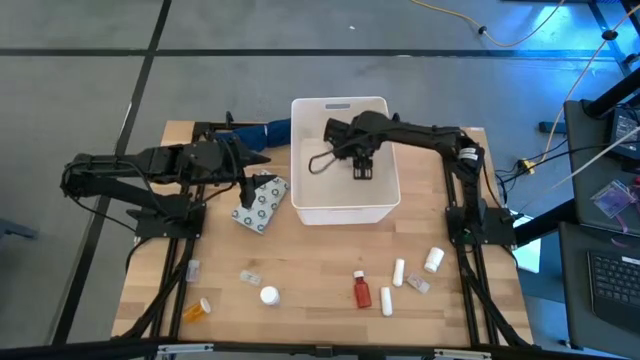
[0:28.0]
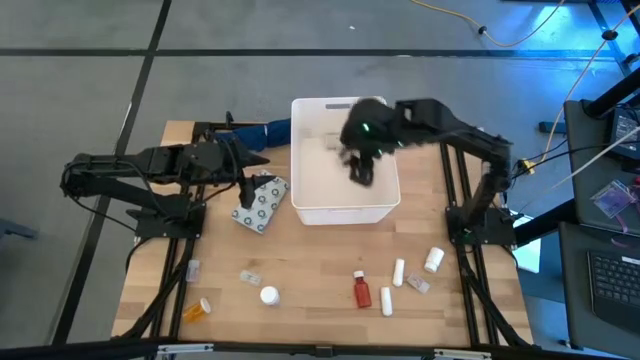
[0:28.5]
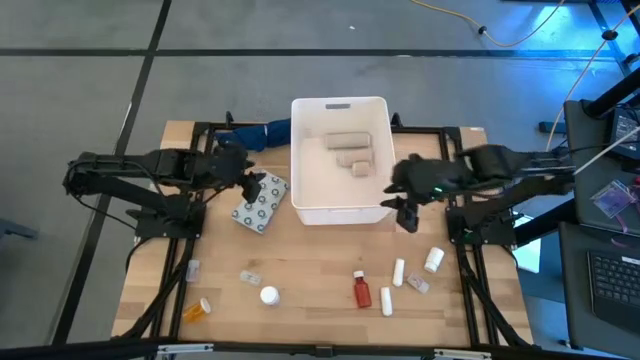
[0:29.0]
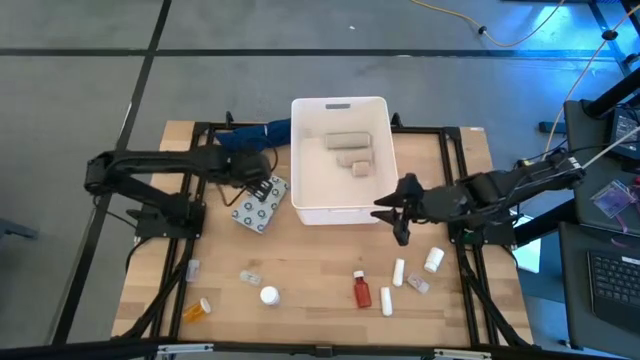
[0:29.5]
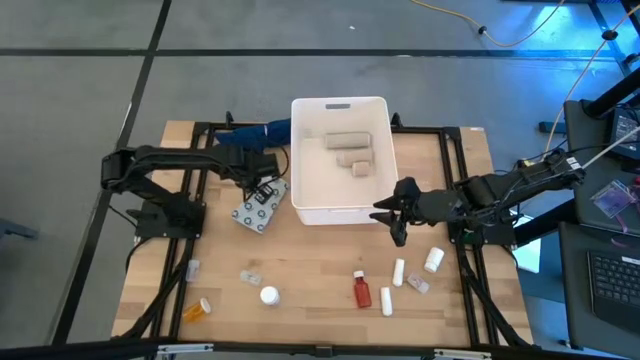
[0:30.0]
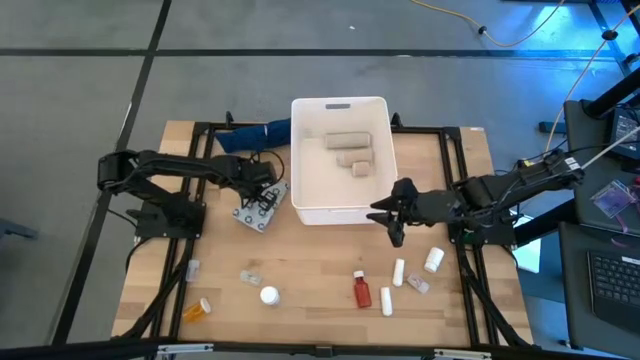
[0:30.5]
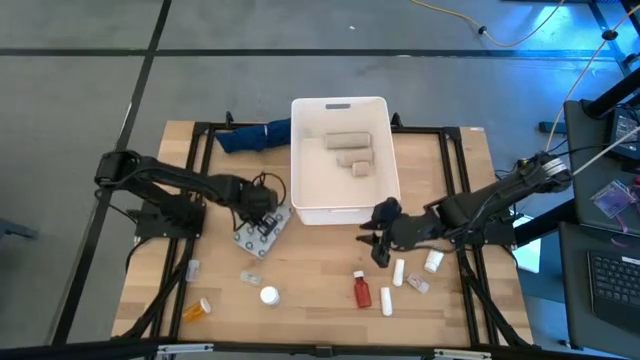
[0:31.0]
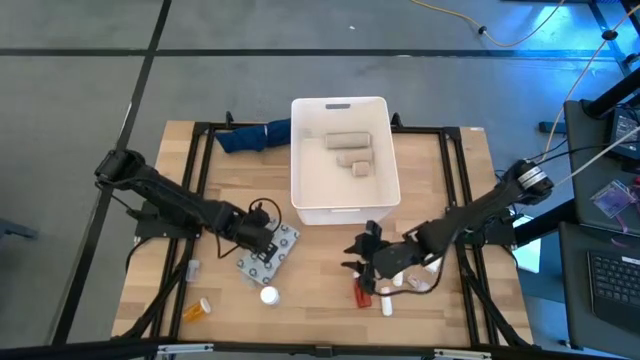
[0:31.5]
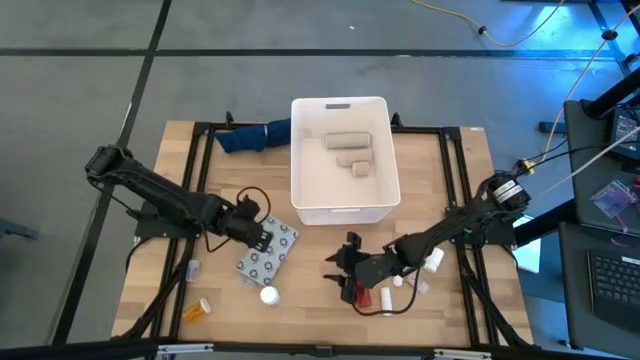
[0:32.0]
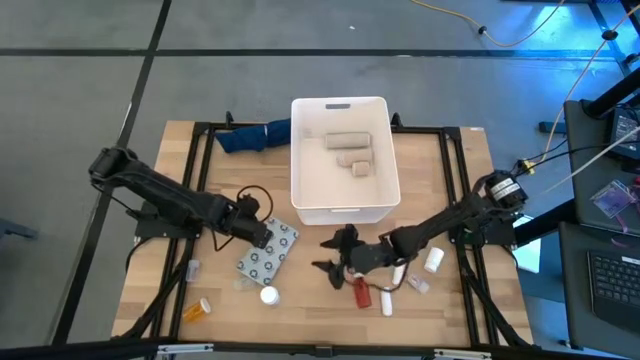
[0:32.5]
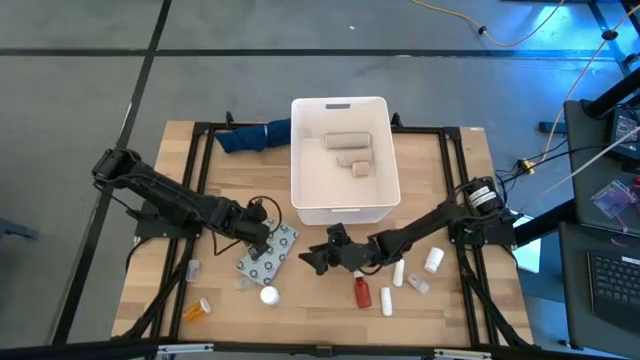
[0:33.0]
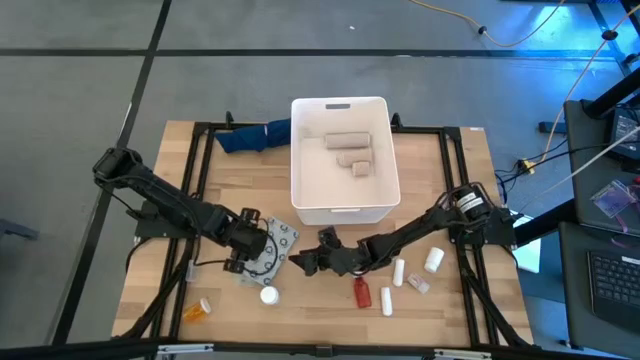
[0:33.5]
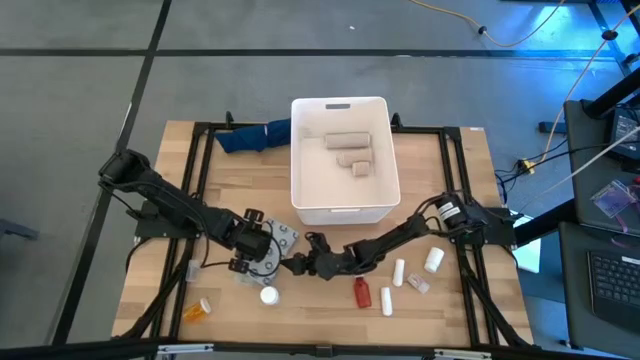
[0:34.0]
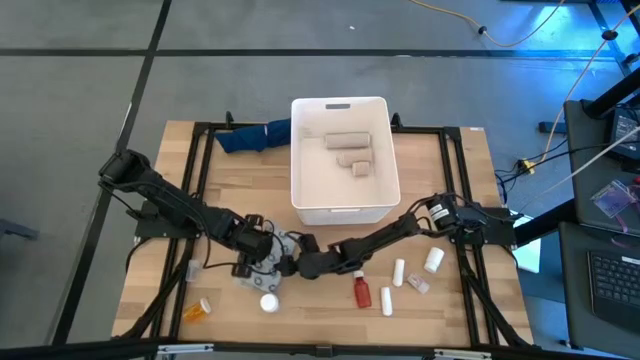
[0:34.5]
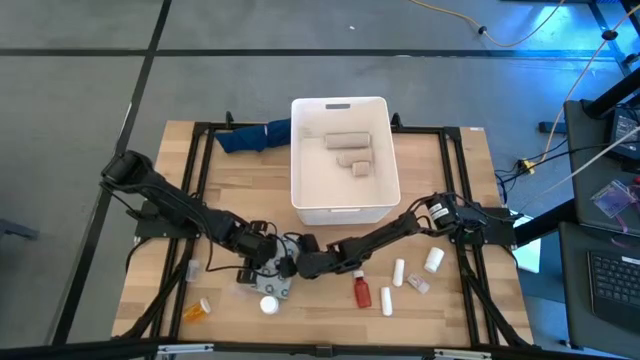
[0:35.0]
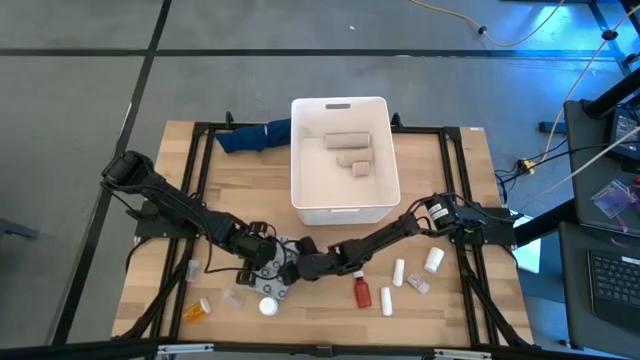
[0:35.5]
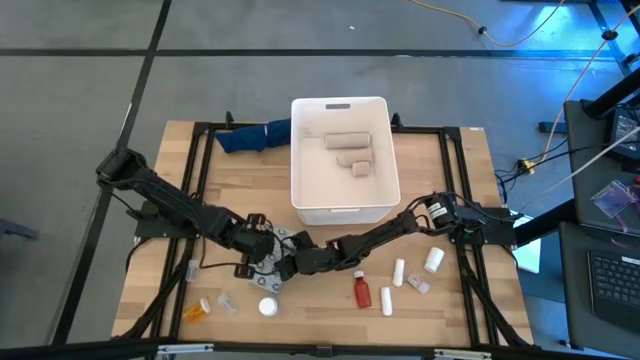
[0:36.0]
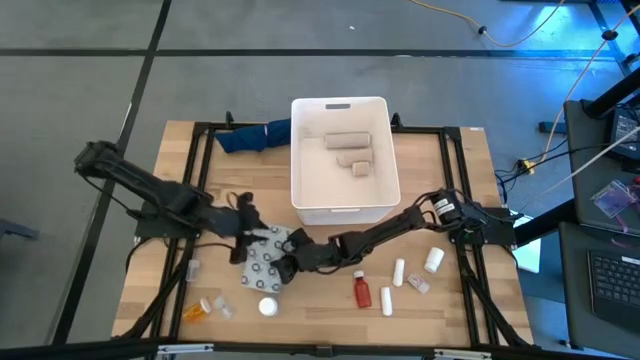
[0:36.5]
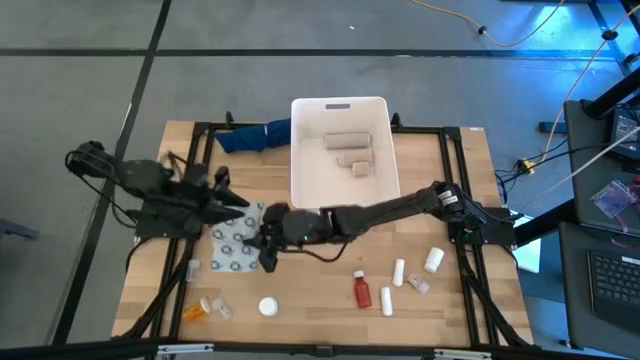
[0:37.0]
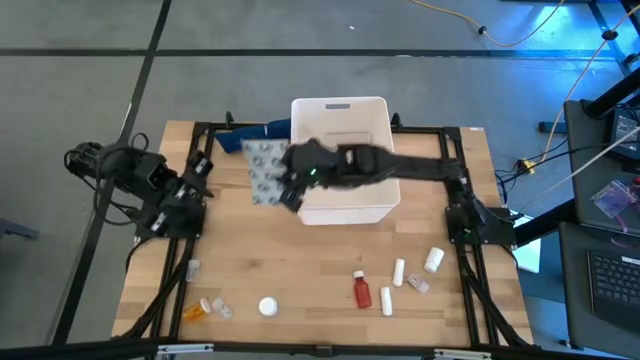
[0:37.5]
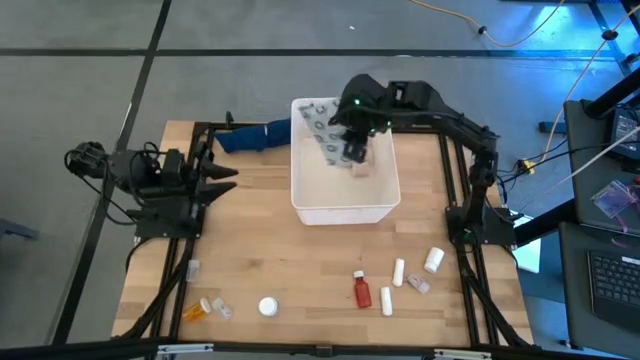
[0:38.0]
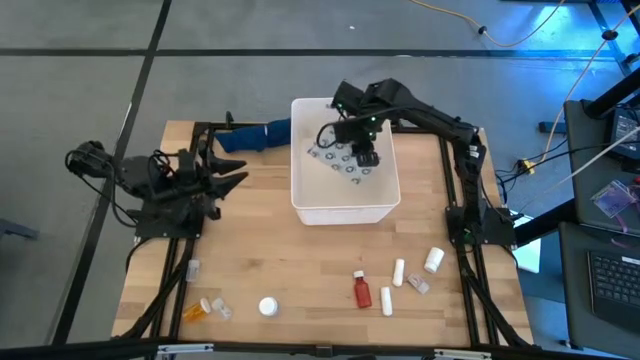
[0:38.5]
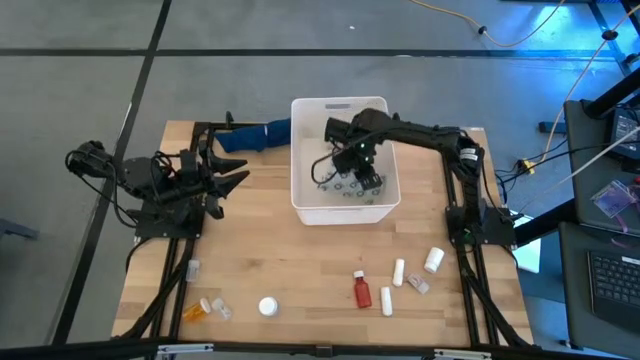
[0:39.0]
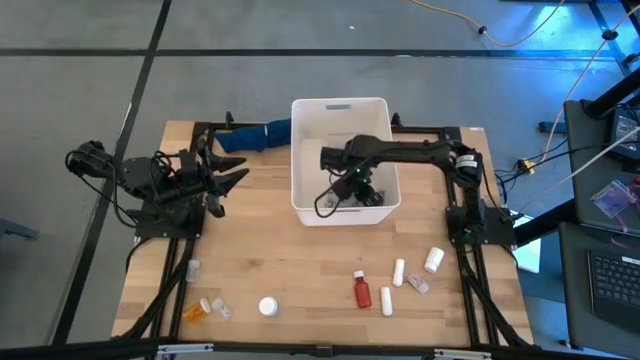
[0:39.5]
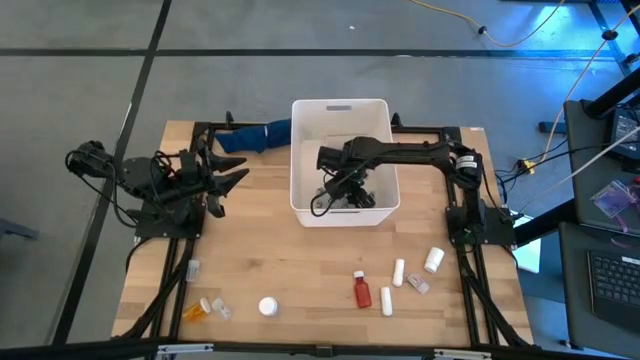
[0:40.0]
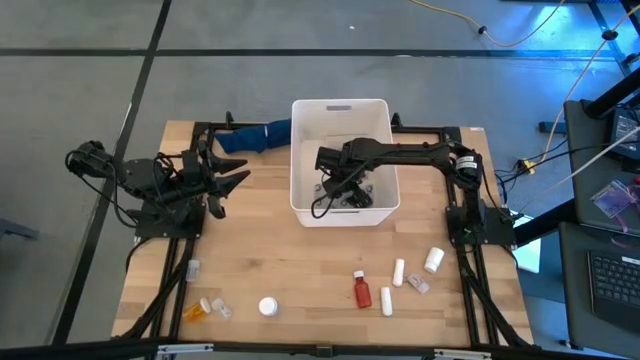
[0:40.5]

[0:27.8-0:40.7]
Task: Pick & place medical supplies in basket/bin
Put the mailer bag into the bin
